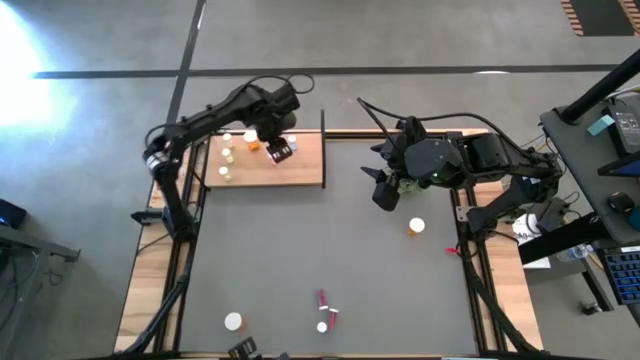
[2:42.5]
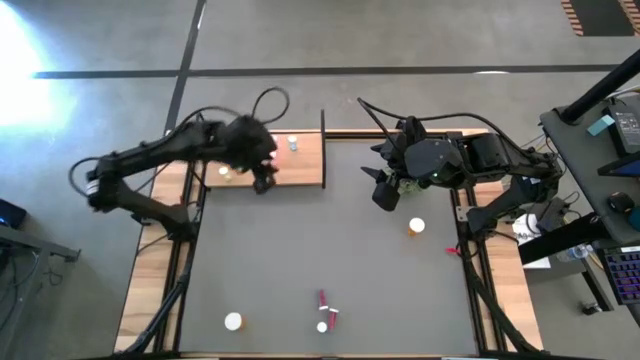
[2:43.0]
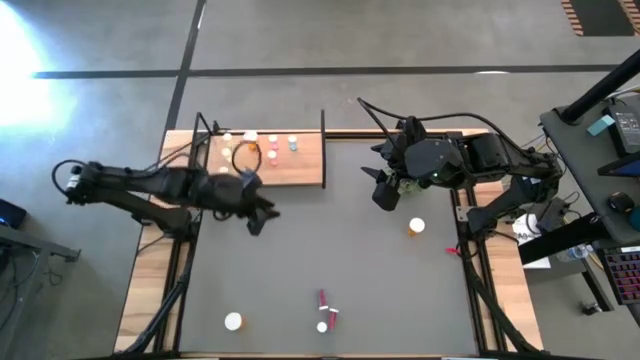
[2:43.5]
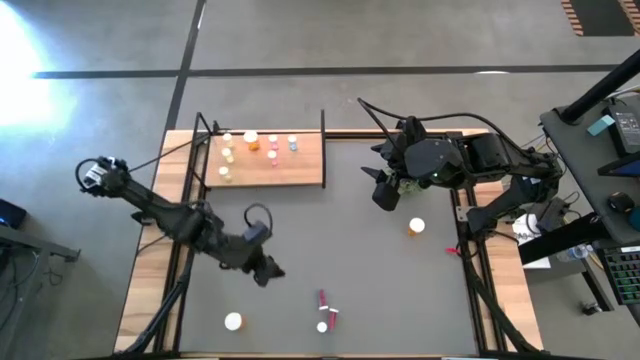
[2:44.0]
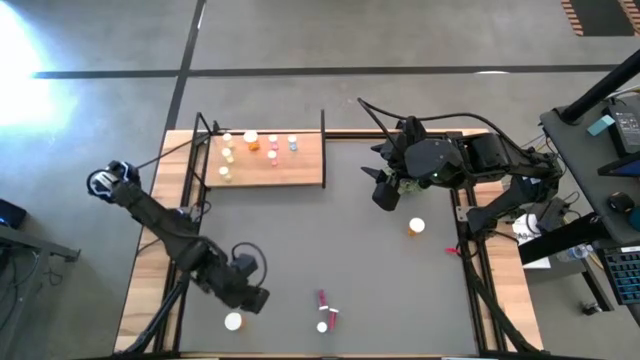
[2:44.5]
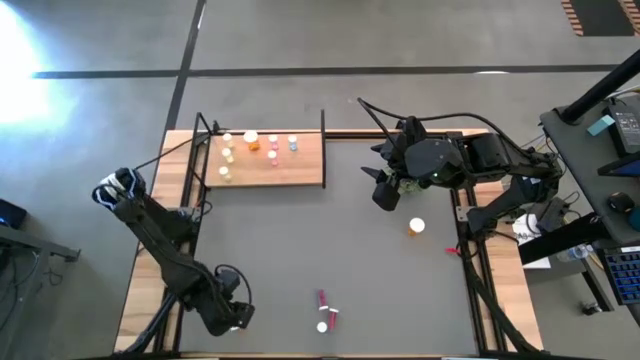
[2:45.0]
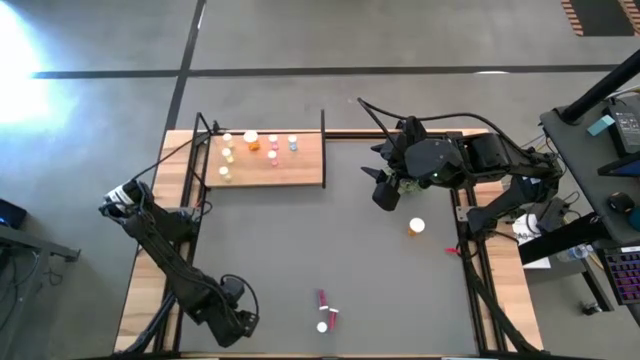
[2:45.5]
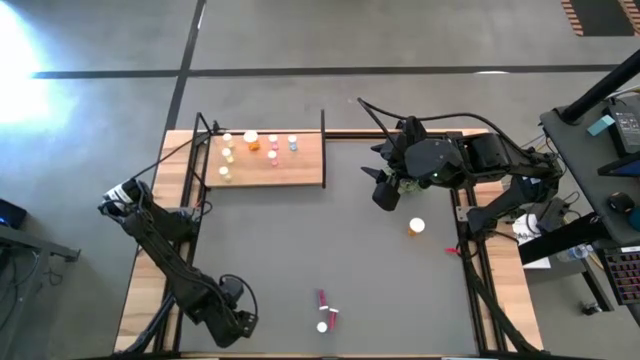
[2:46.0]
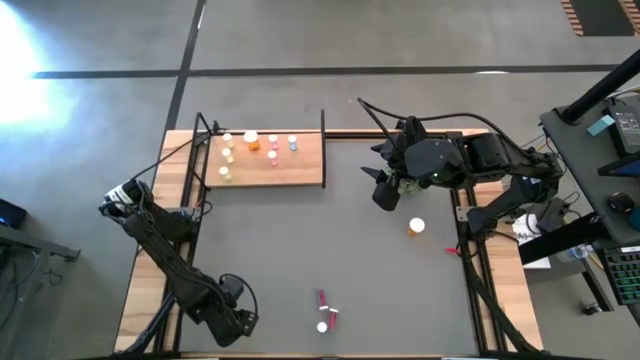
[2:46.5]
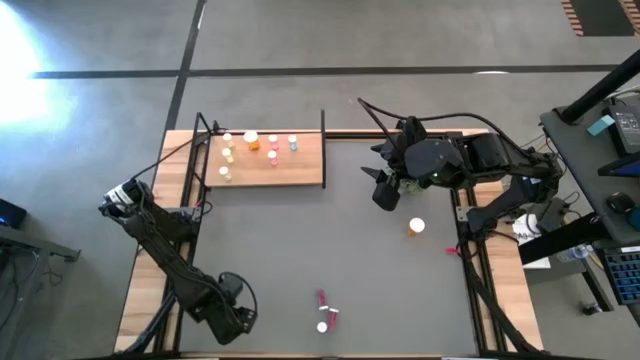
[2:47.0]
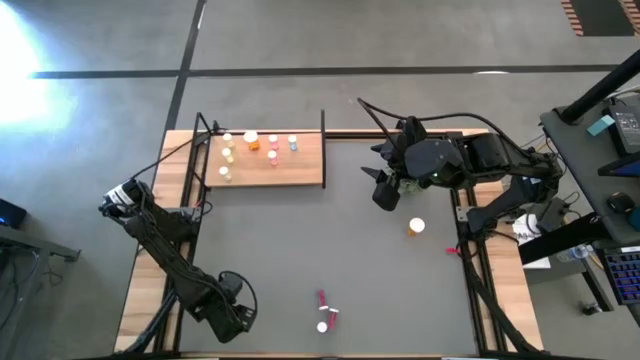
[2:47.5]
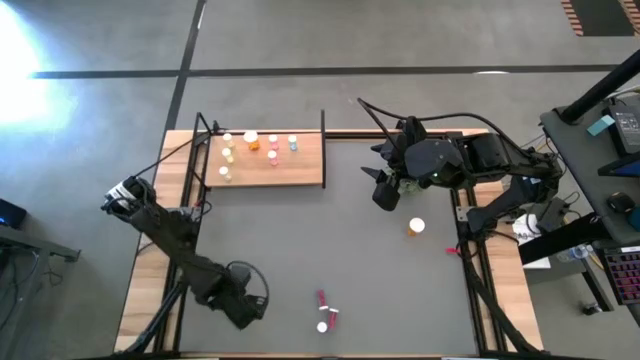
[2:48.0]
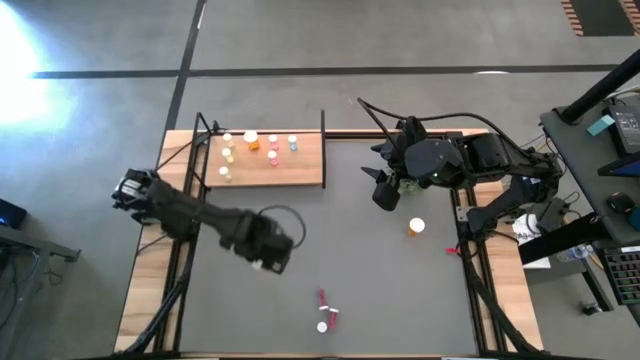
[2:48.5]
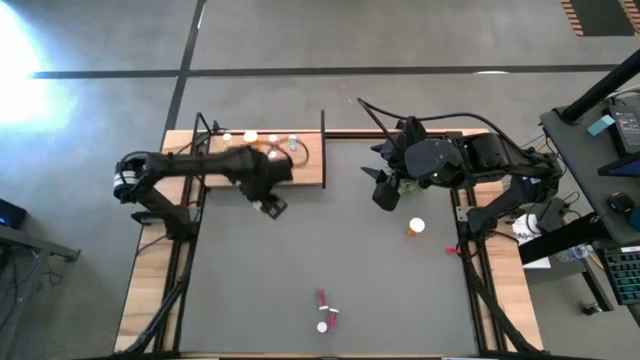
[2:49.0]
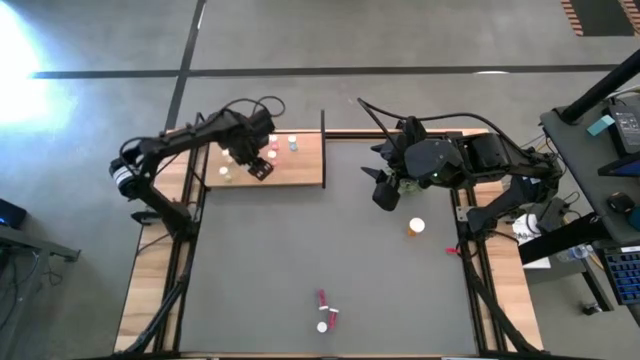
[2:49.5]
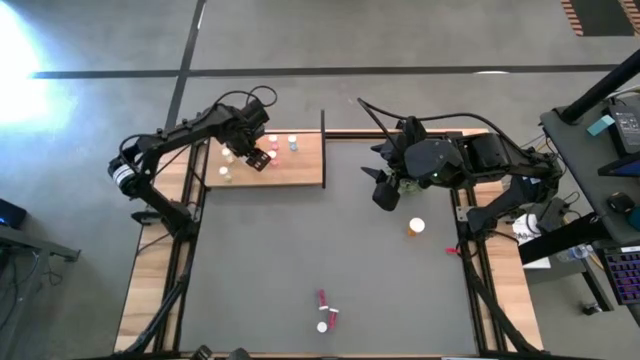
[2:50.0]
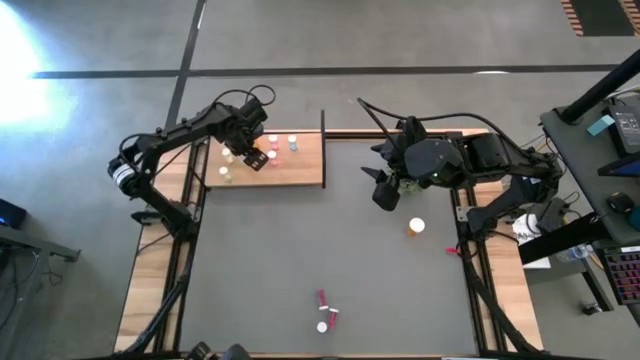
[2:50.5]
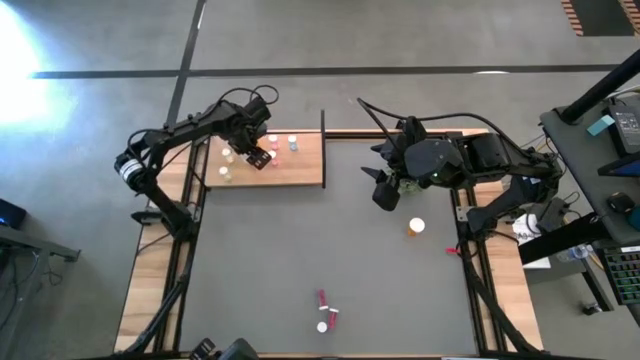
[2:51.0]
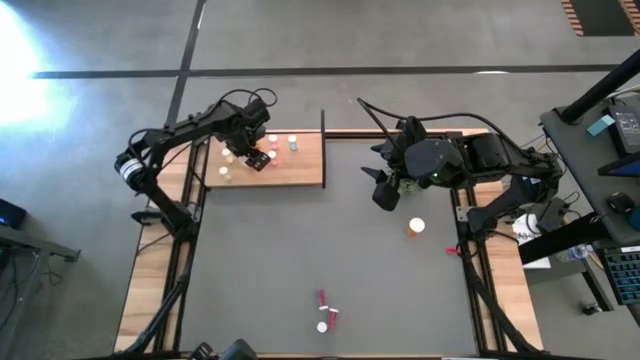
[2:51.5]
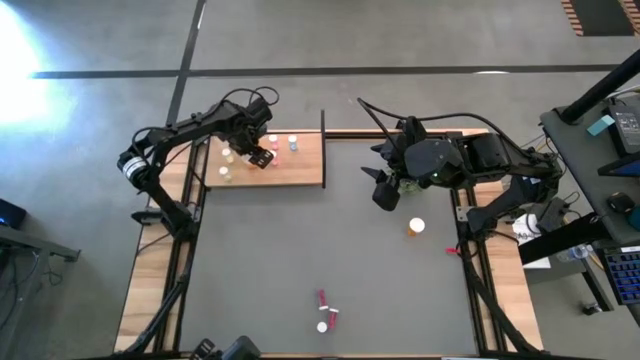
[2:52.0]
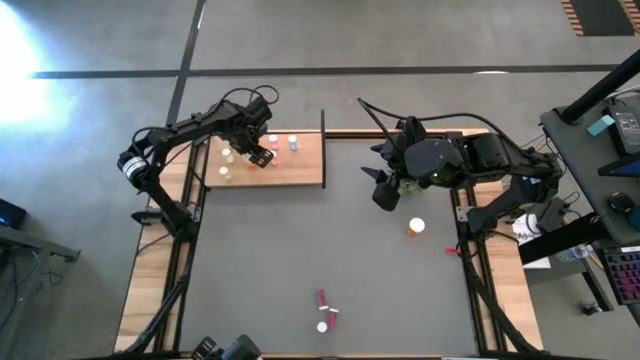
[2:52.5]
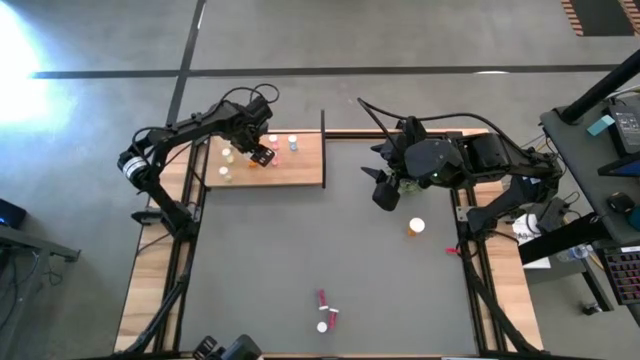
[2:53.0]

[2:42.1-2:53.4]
Task: Pick and place medicine bottles onto shelf by color
Put the bottom orange pill bottle on the shelf aligned with the other orange bottle

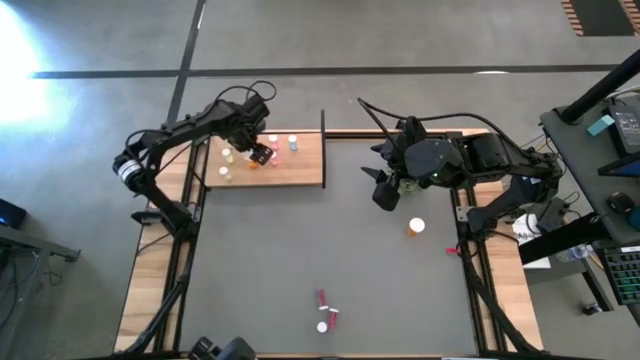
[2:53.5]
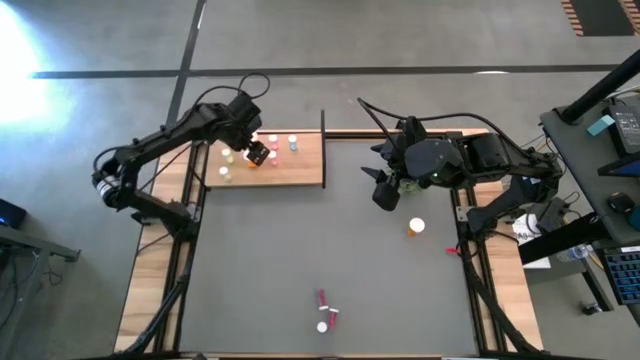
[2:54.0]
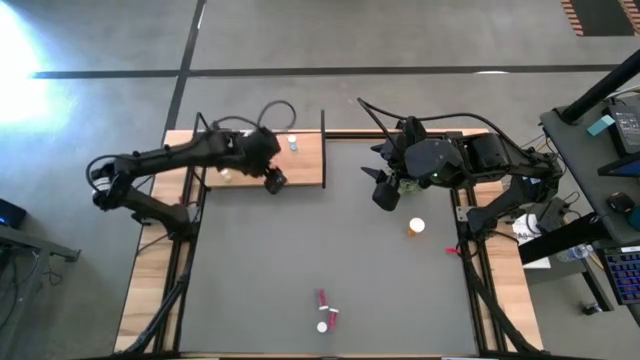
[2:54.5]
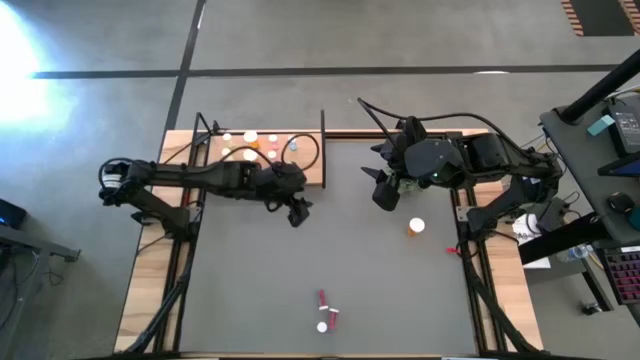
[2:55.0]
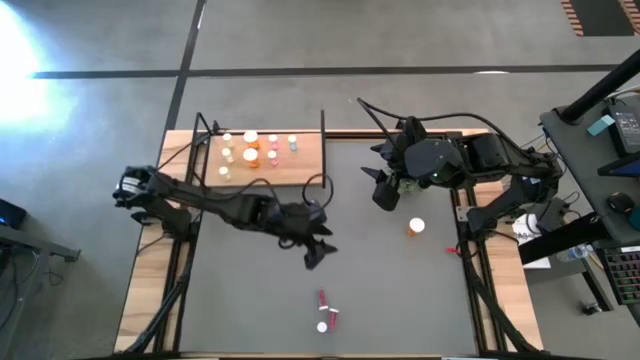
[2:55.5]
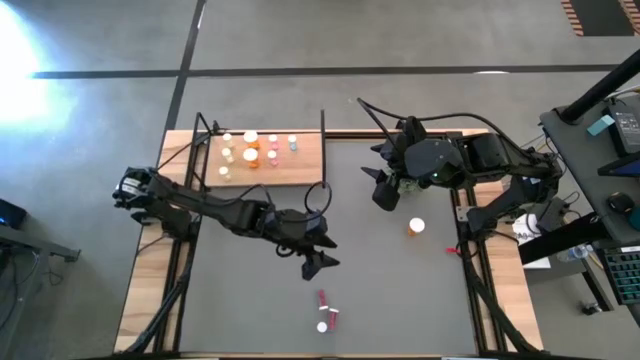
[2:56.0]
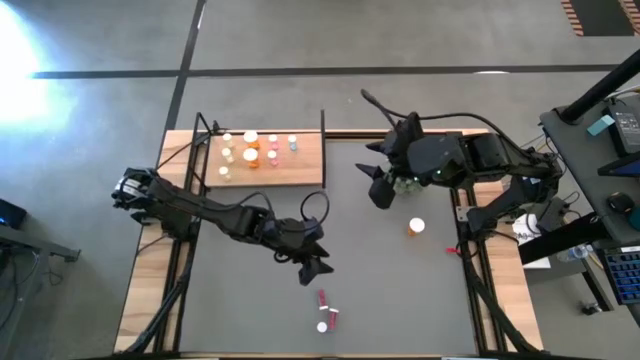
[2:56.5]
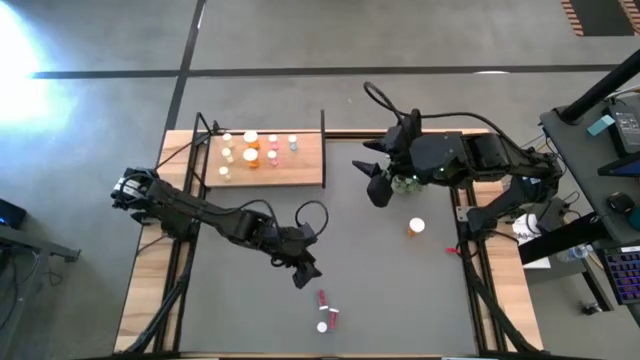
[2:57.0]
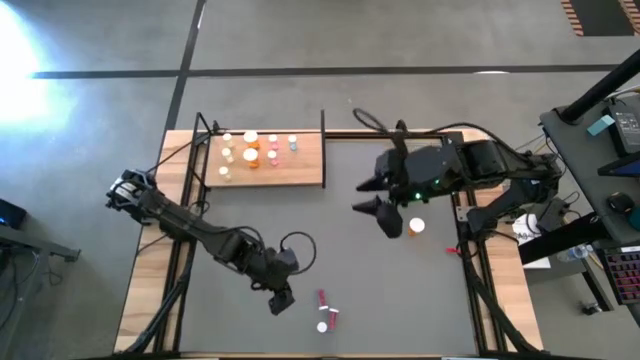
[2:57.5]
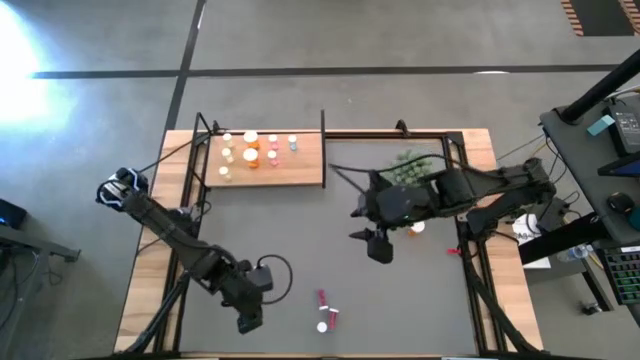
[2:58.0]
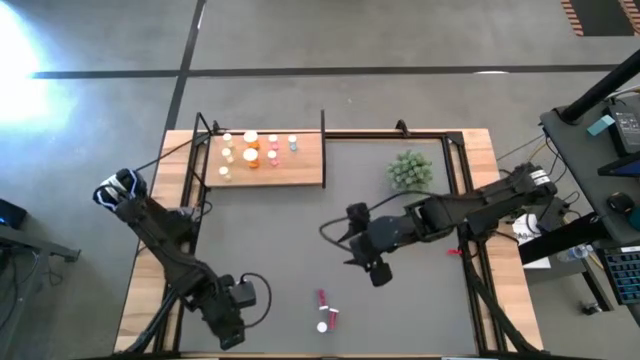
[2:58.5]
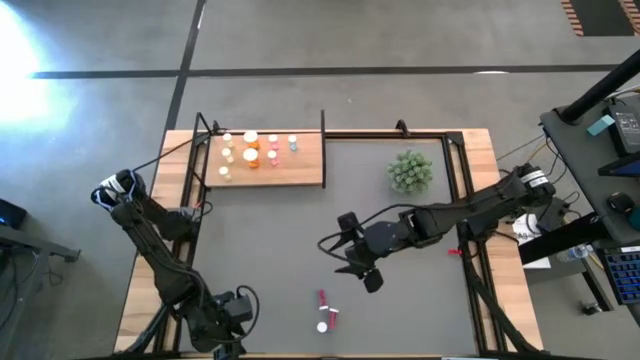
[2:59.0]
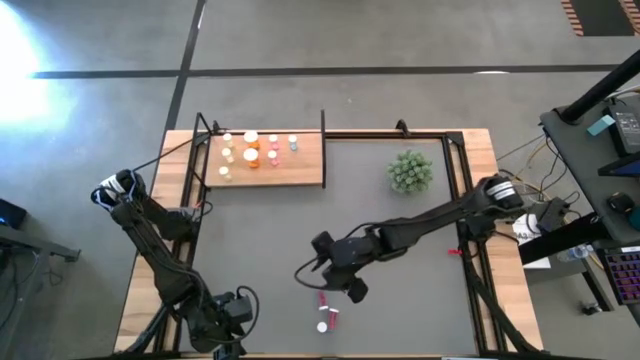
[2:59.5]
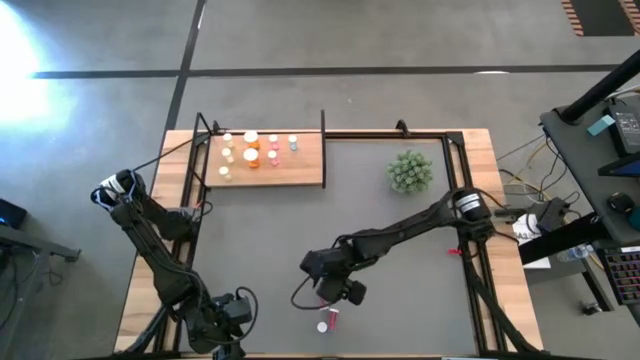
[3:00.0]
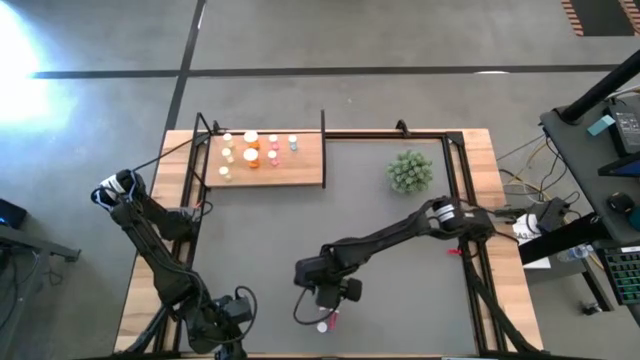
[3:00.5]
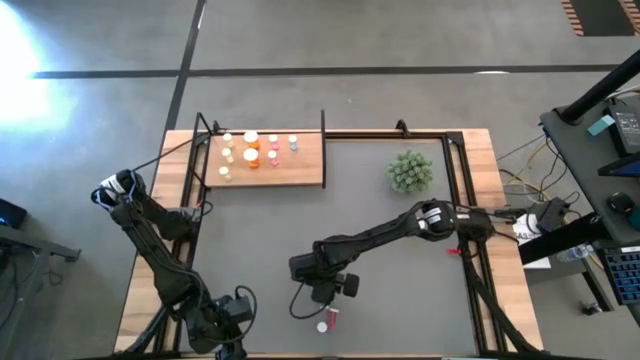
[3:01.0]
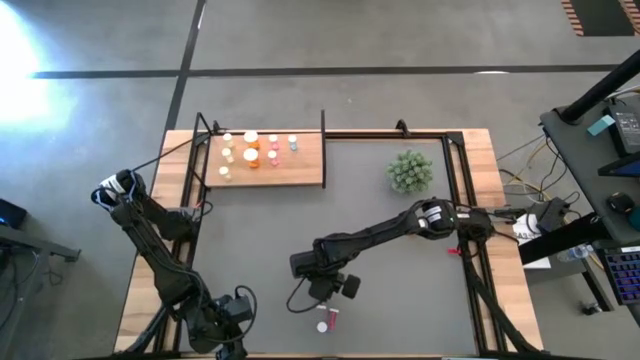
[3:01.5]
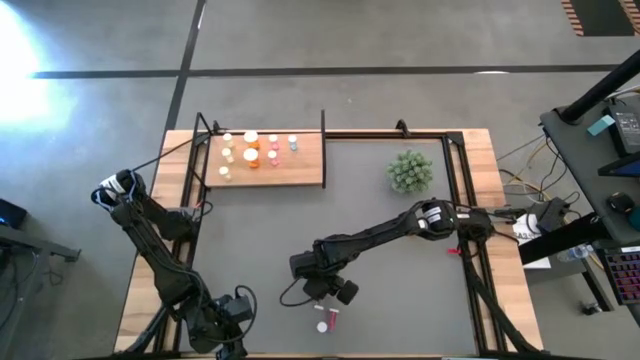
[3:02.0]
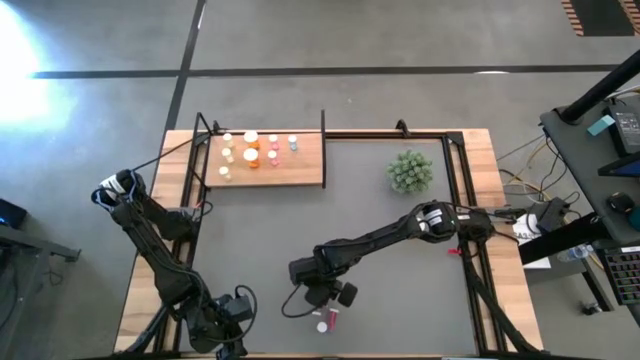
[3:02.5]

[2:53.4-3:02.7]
Put the top blue pill bottle on the shelf aligned with the other blue bottle
